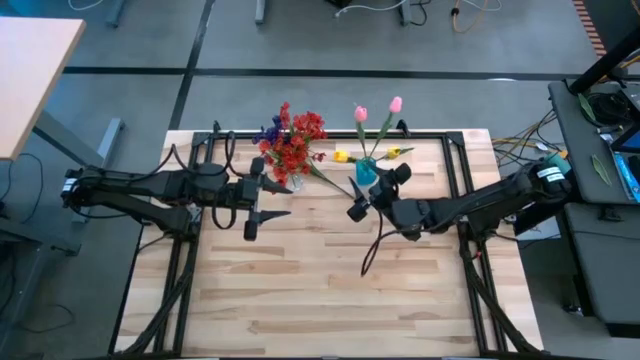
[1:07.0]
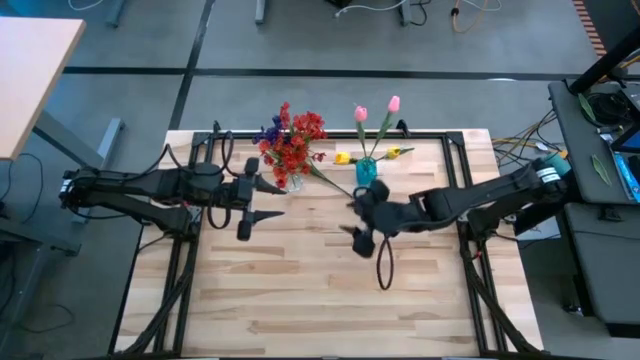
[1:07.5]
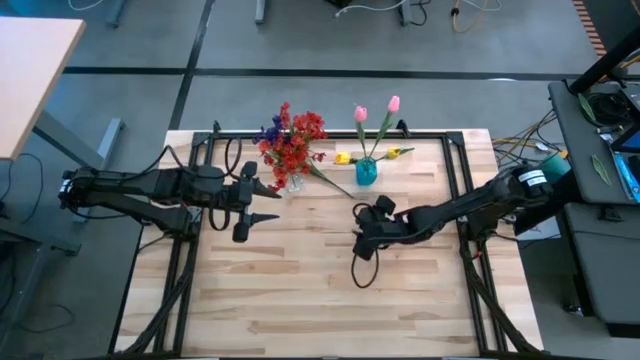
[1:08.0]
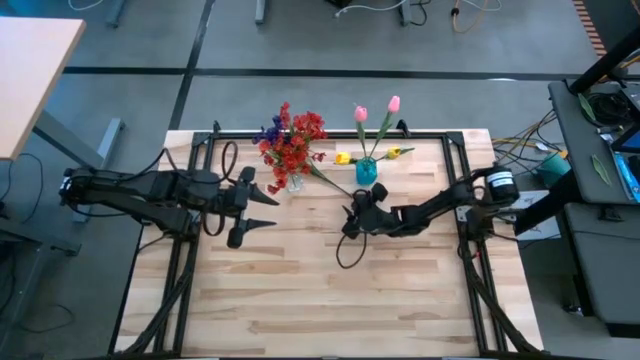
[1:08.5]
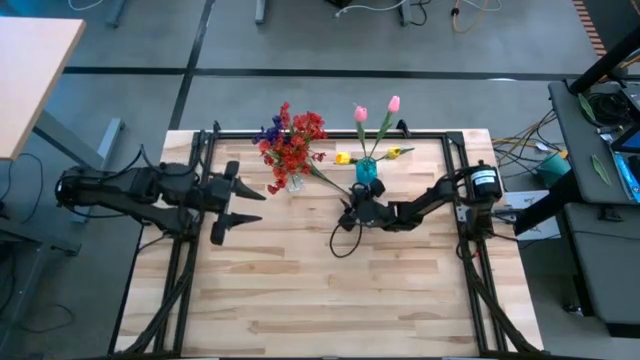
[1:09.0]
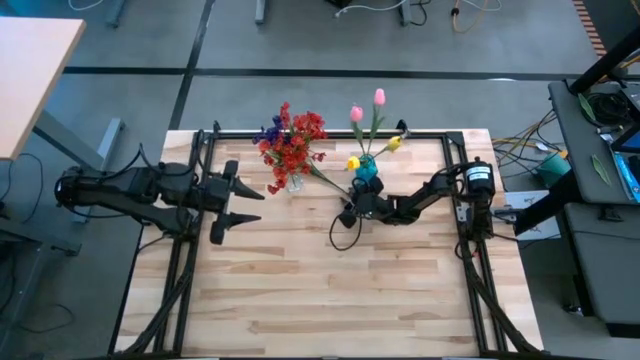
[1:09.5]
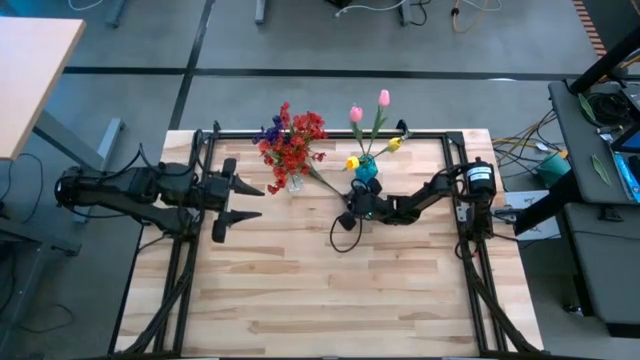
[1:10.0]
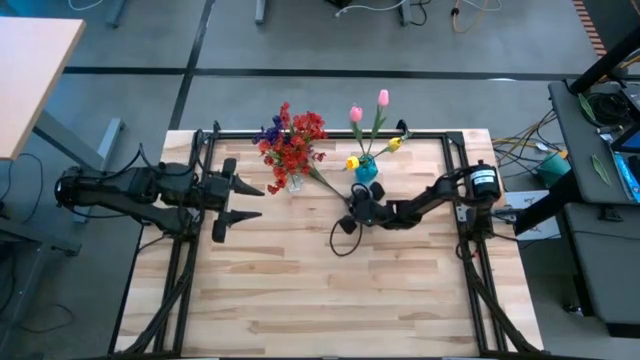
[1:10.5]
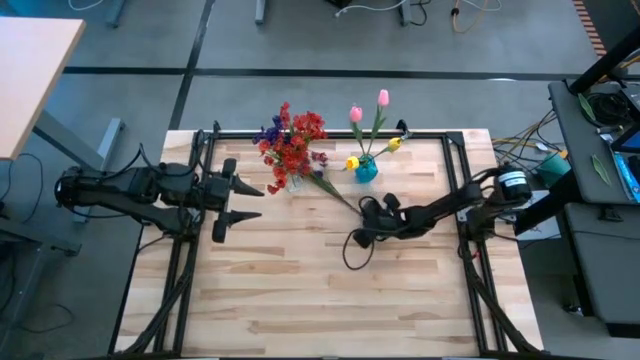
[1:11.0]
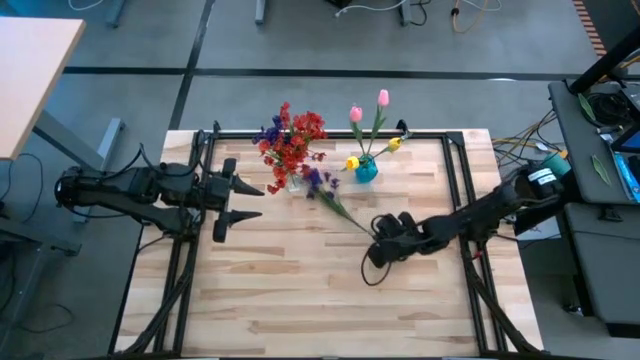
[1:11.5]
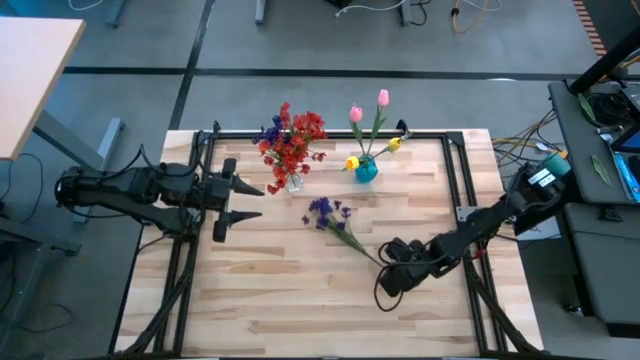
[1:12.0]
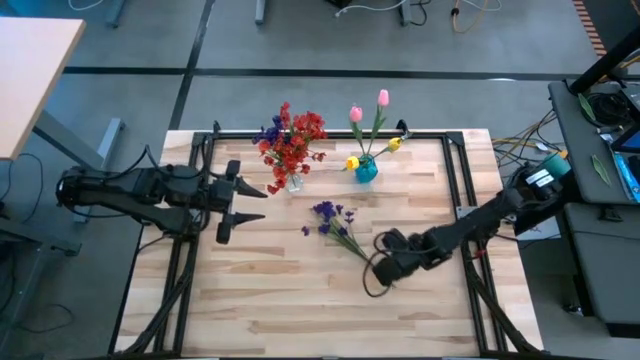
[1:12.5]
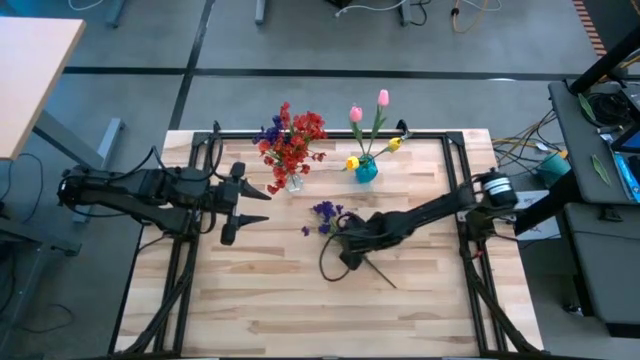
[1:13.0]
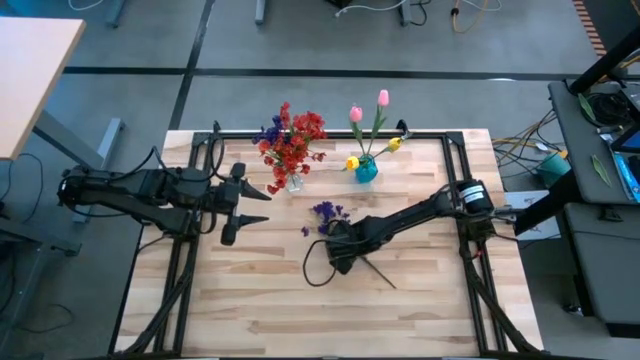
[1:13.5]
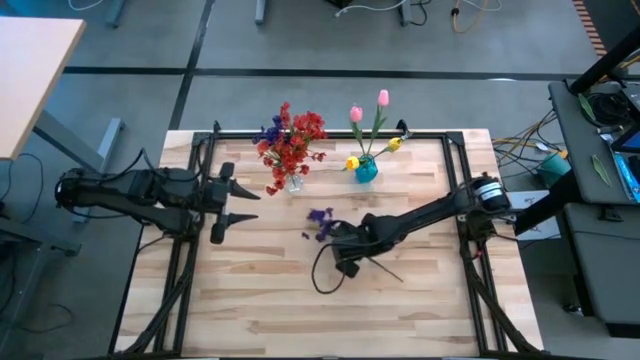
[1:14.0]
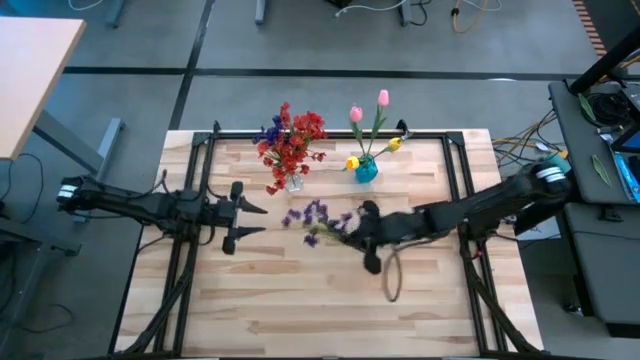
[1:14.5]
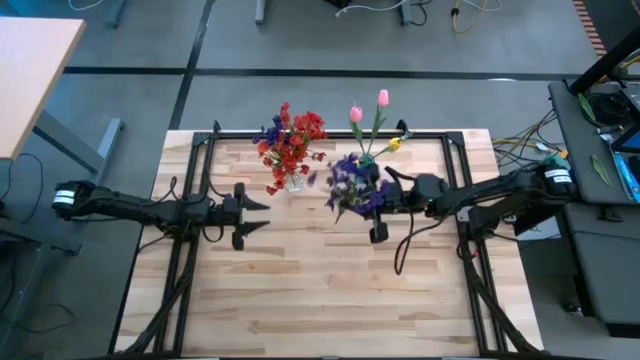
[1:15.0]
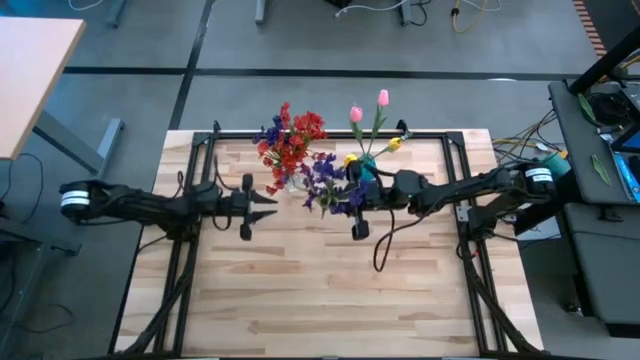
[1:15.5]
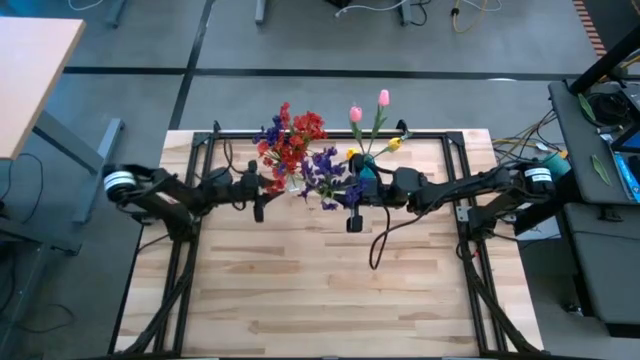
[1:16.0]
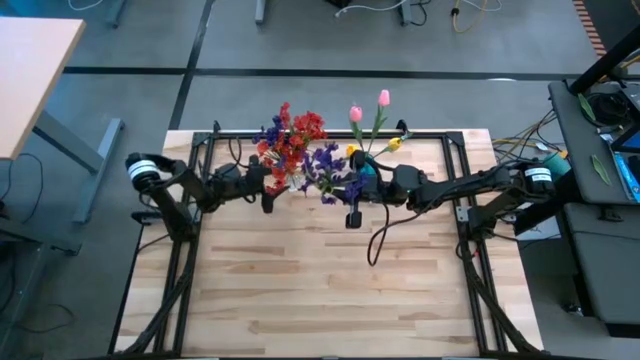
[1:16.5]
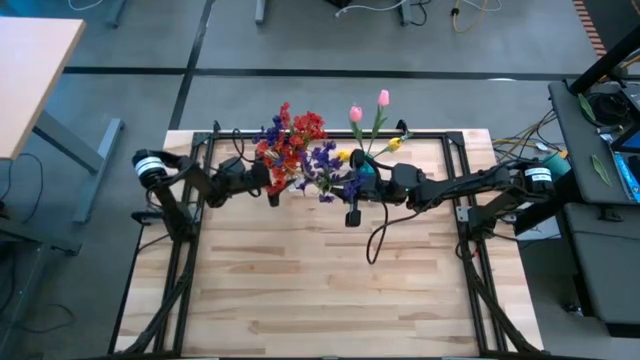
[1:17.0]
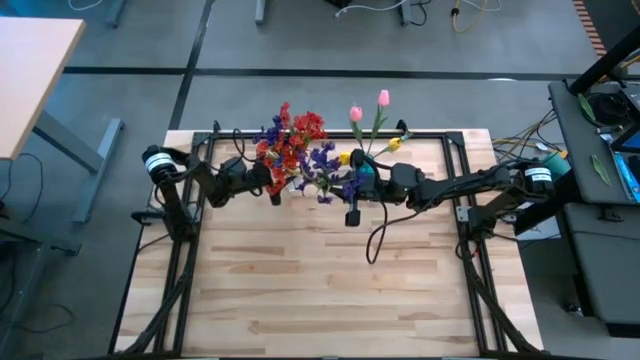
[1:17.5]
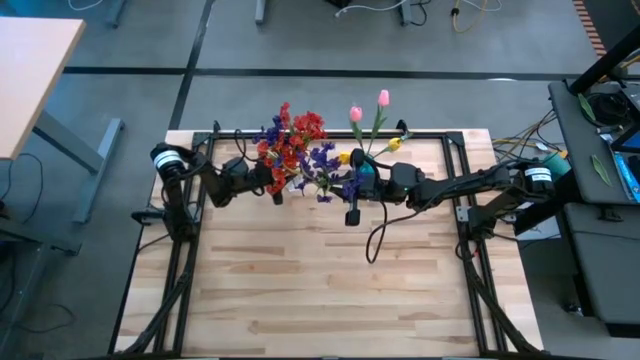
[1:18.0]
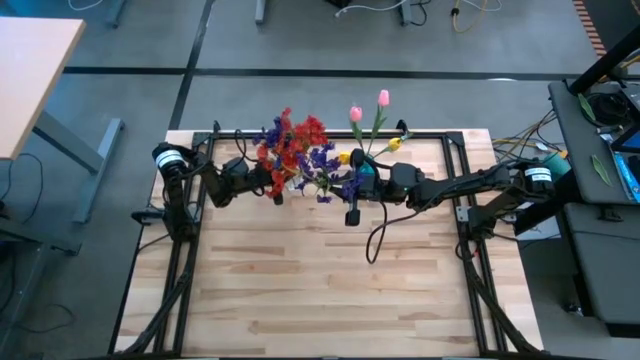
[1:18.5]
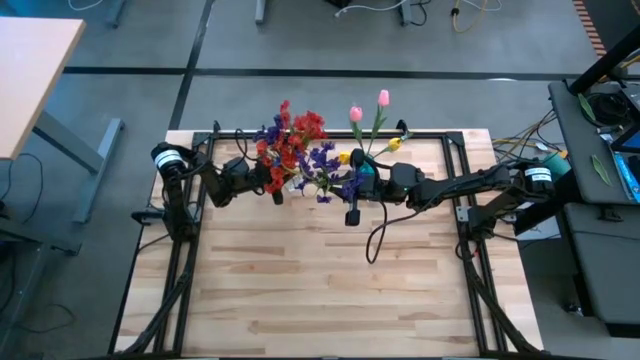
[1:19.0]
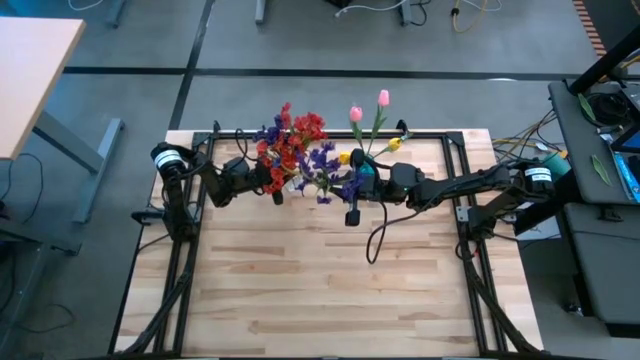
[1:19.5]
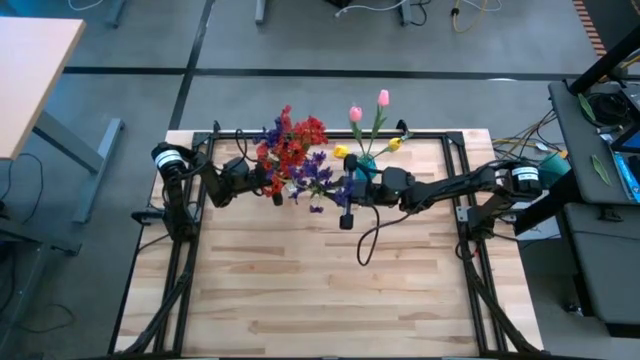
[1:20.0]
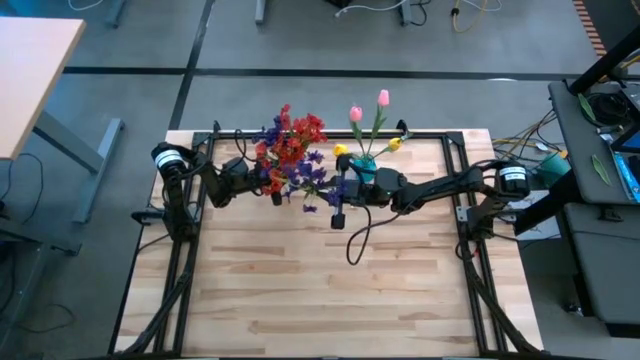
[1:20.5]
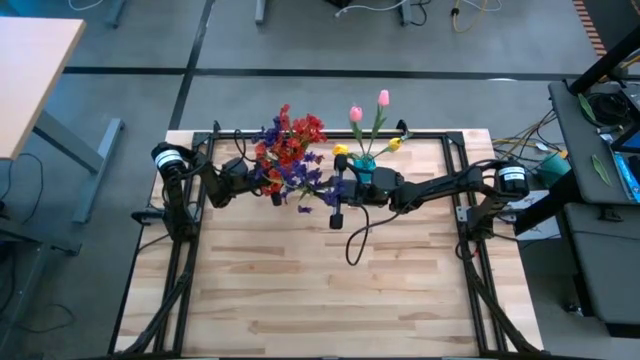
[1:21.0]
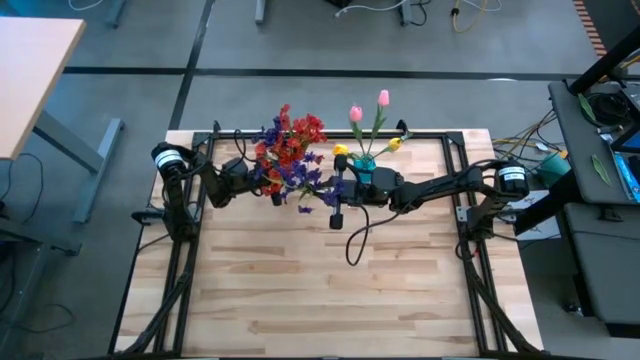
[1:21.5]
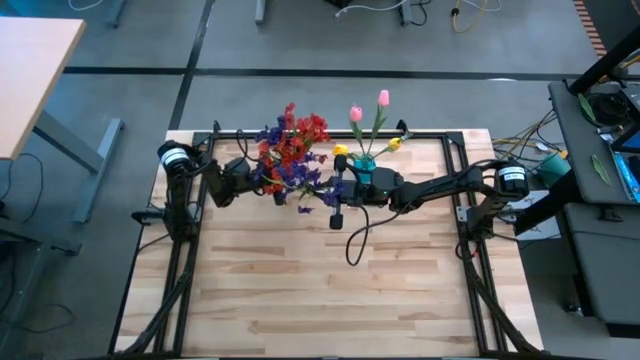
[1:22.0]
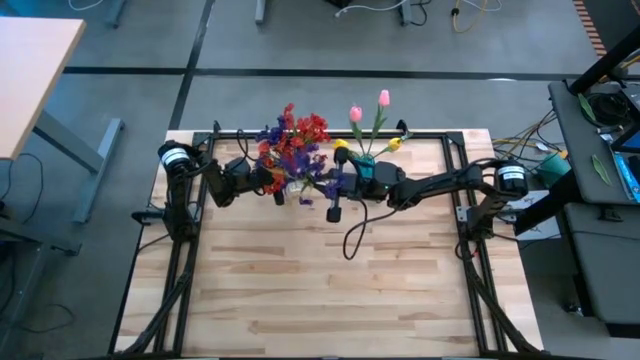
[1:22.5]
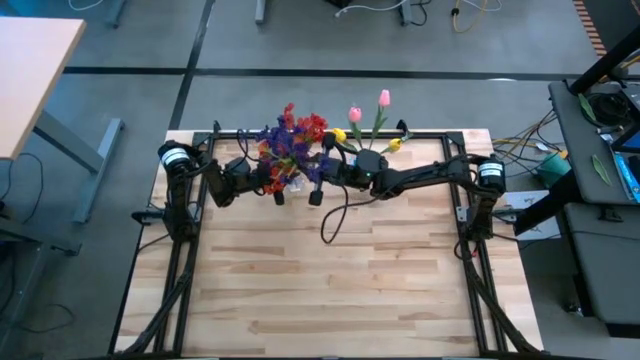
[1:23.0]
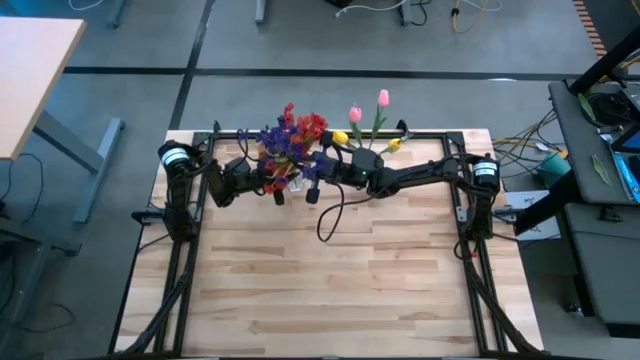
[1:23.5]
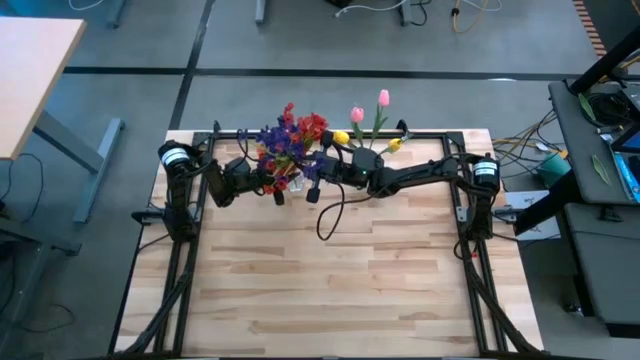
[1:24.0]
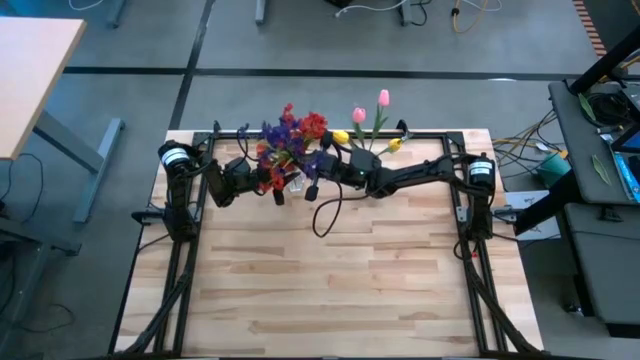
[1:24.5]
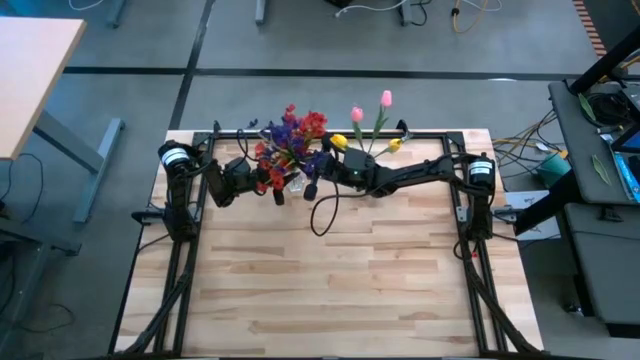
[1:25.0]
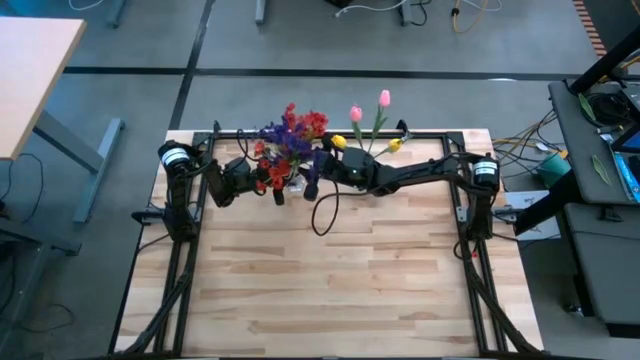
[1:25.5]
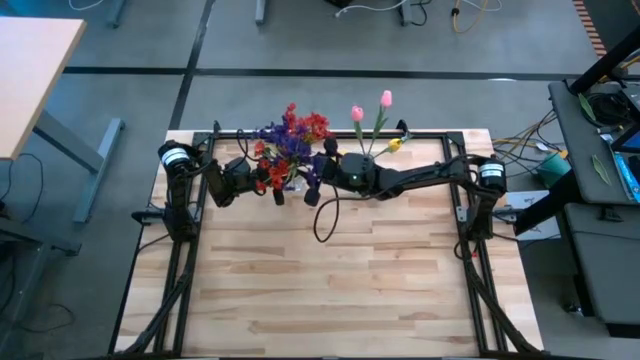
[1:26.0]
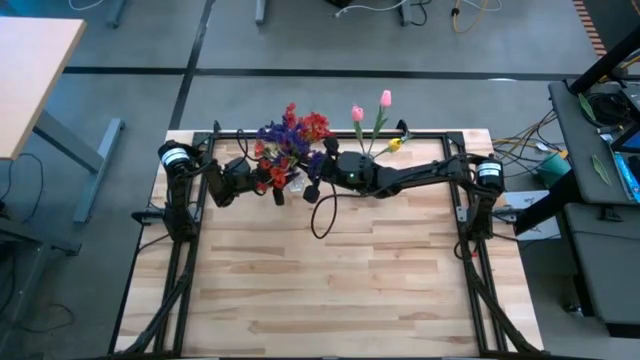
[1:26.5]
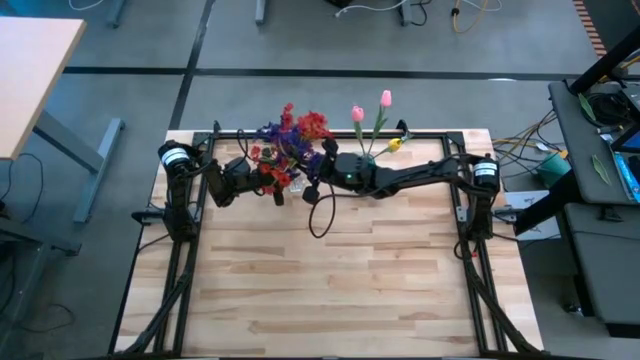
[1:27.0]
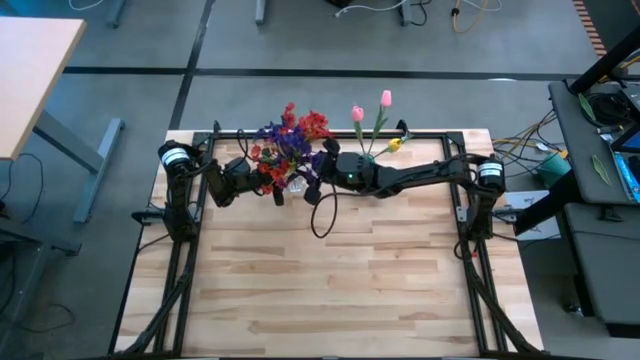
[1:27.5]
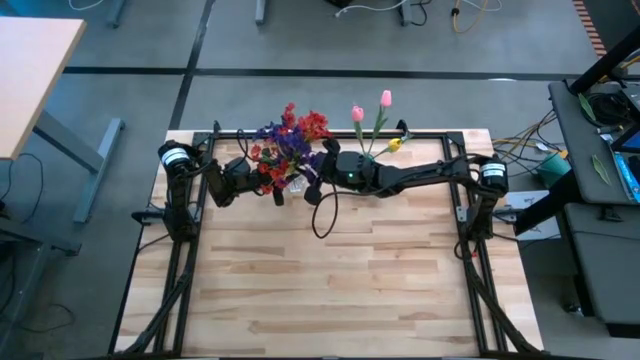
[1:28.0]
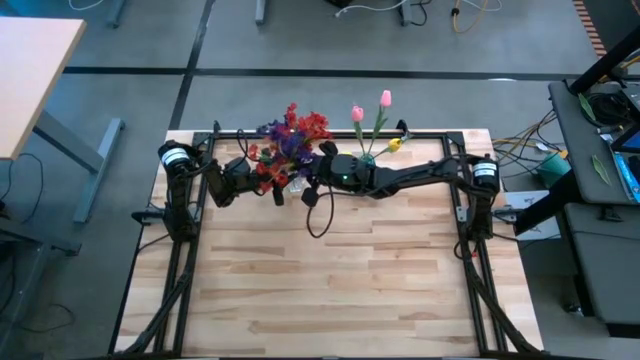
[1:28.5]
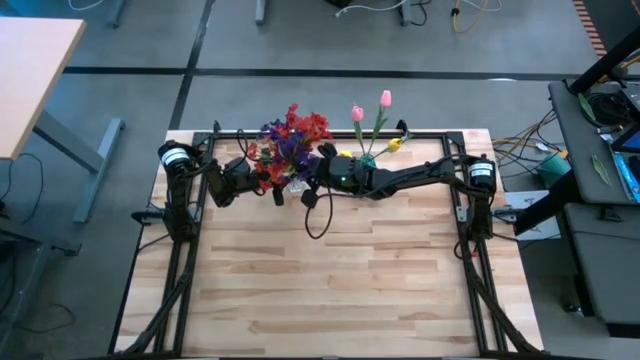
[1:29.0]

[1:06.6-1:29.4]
Task: Sort flowers into vase by color
Put the violet flowers into the transparent vase
